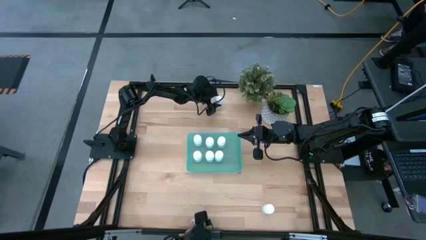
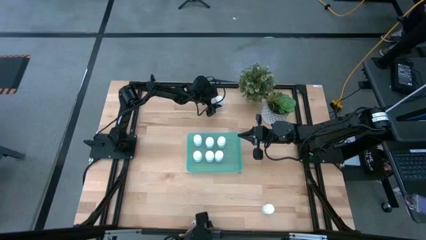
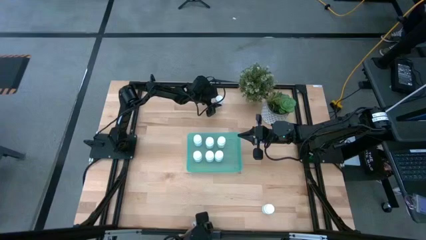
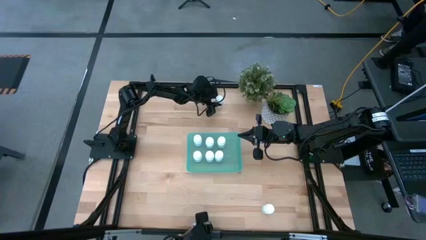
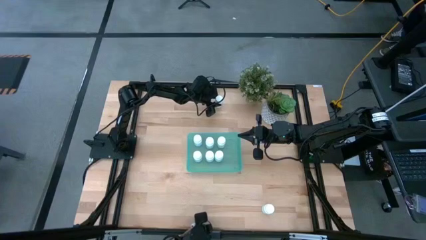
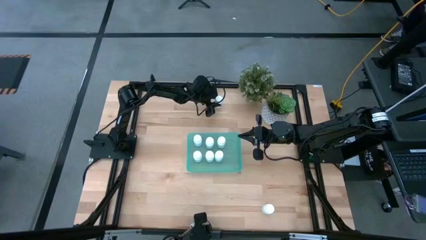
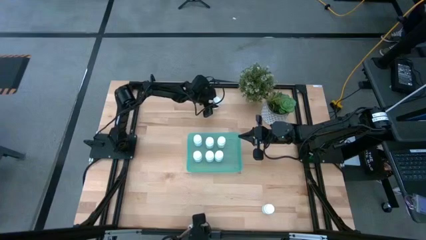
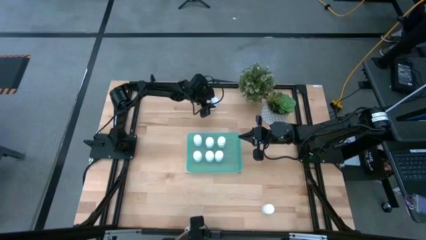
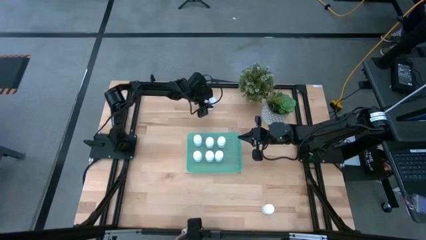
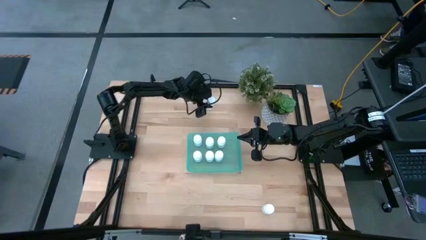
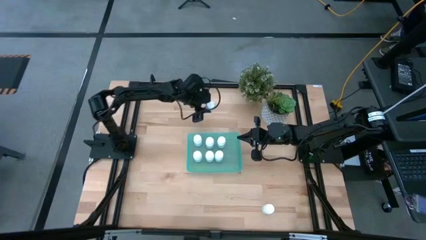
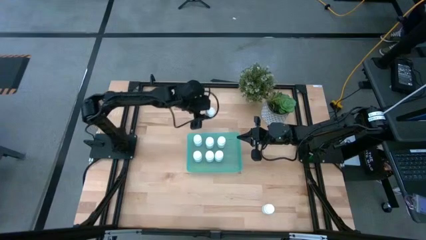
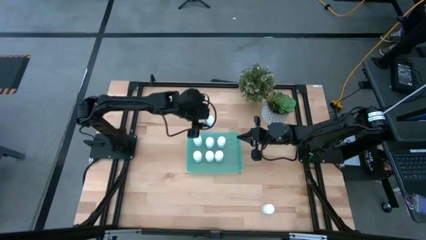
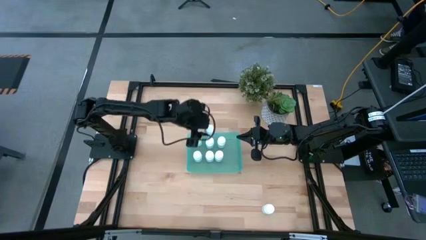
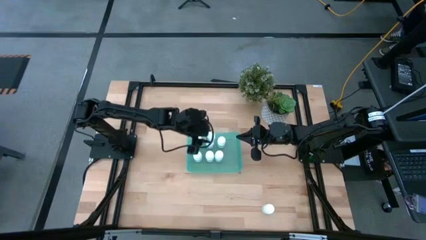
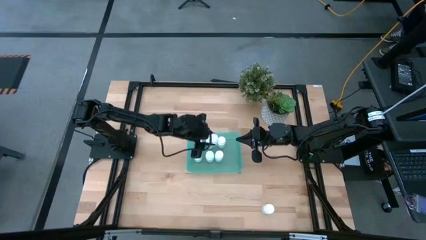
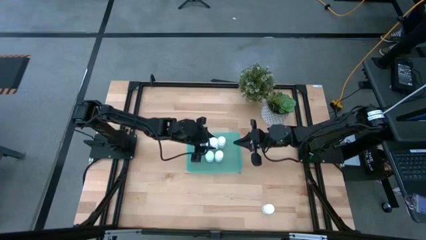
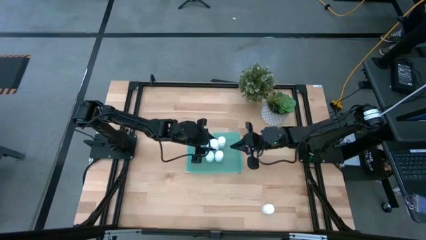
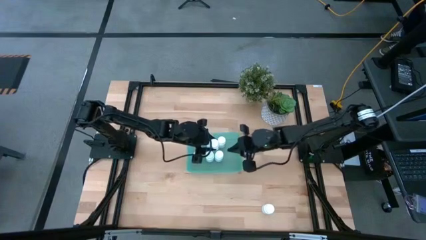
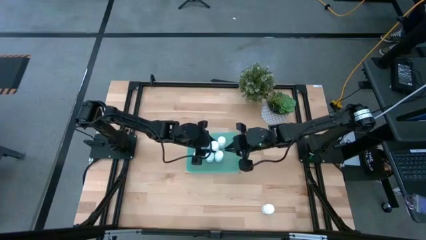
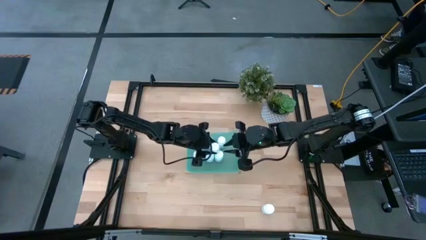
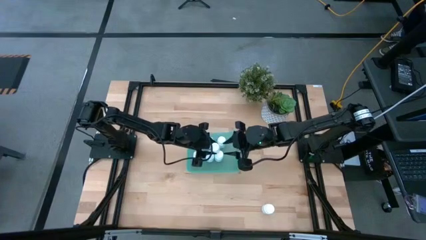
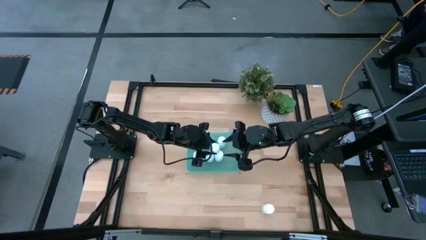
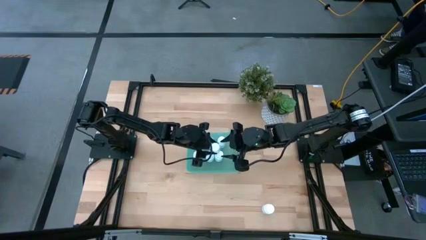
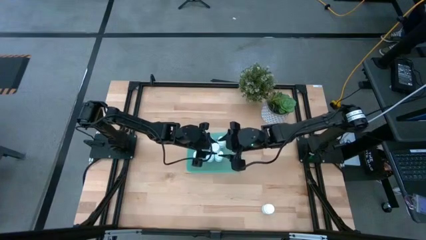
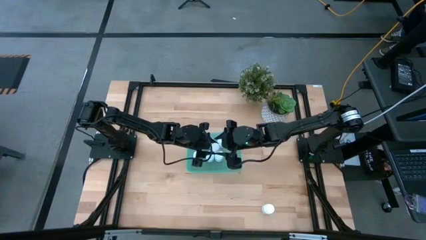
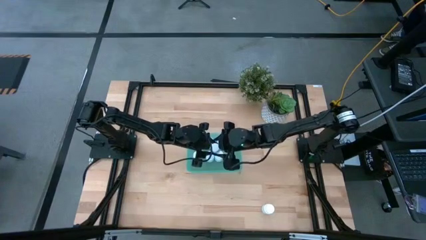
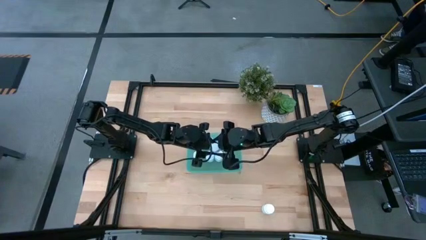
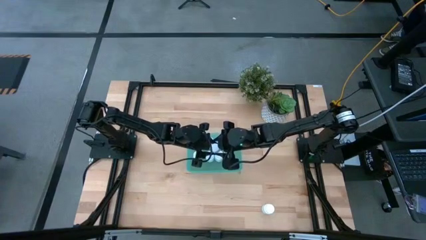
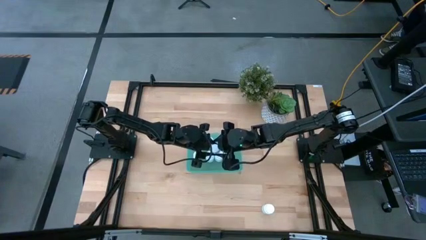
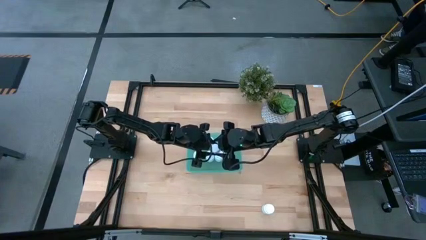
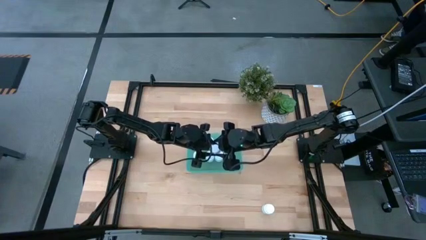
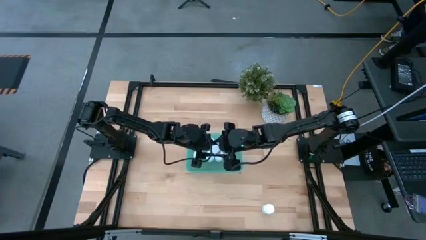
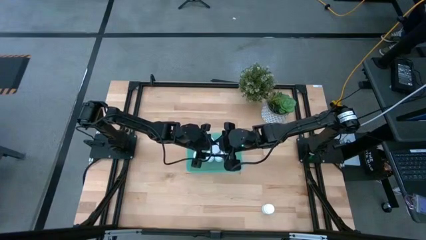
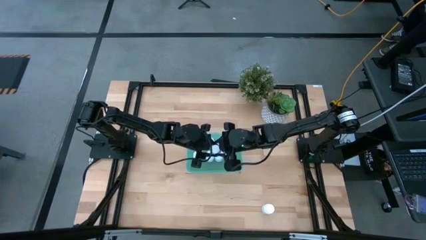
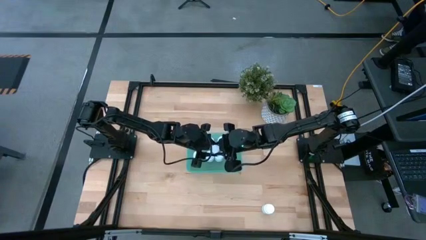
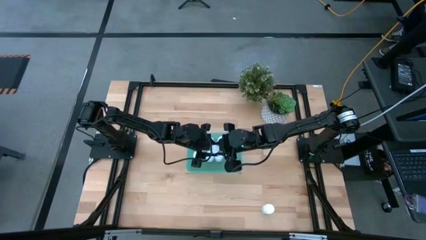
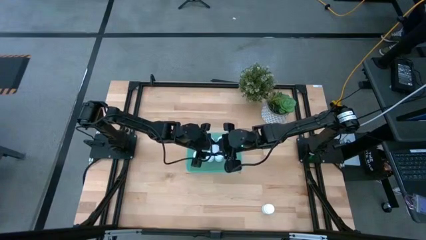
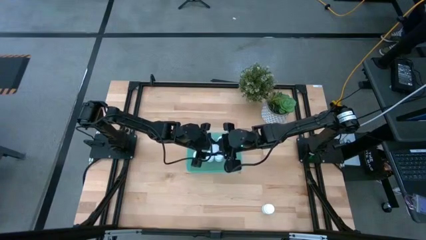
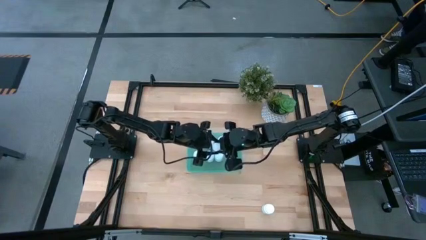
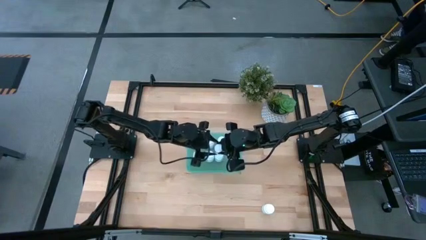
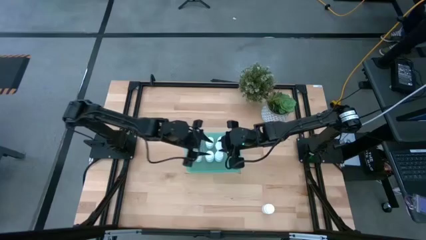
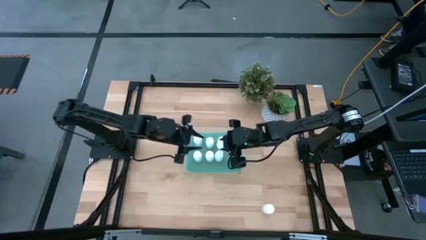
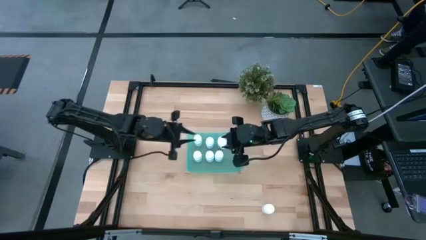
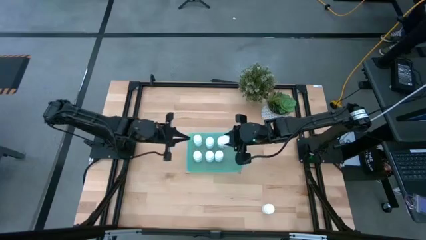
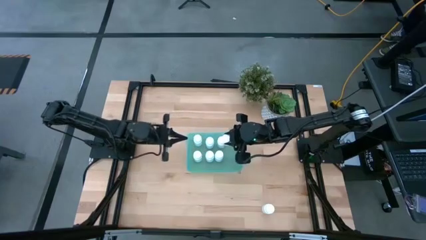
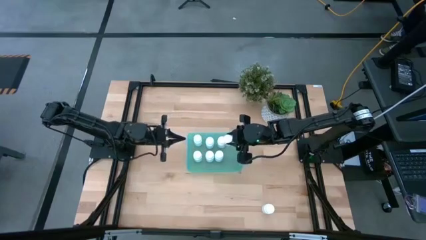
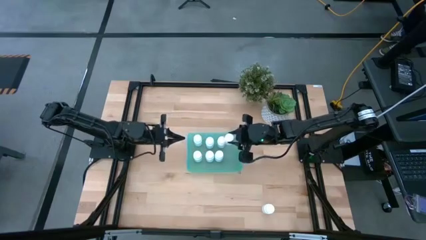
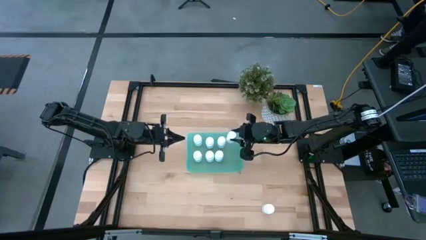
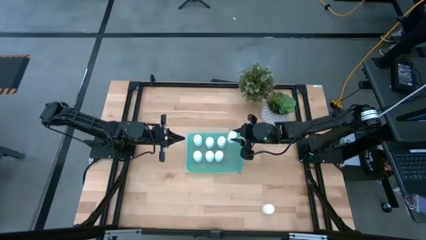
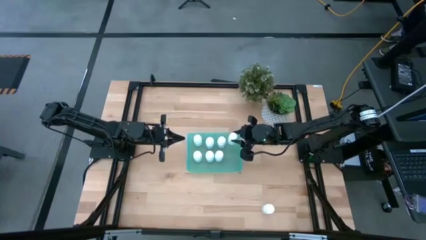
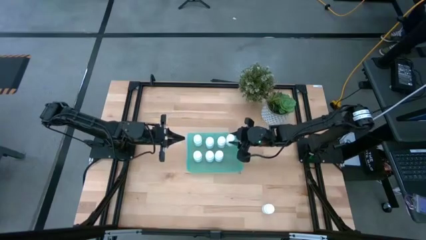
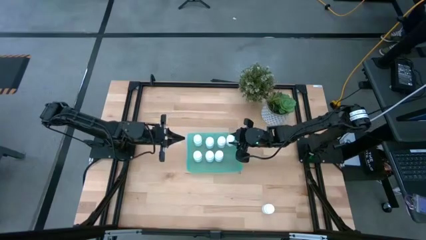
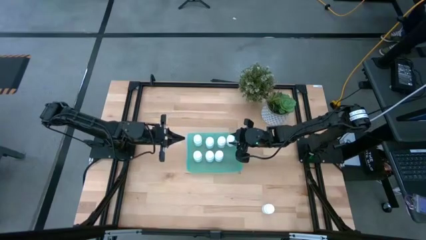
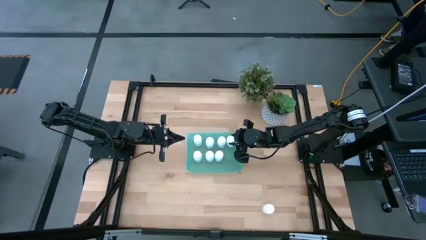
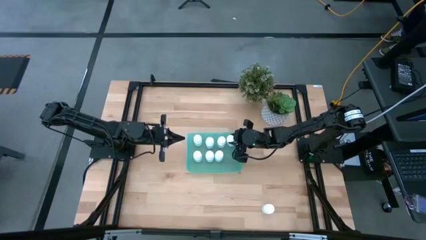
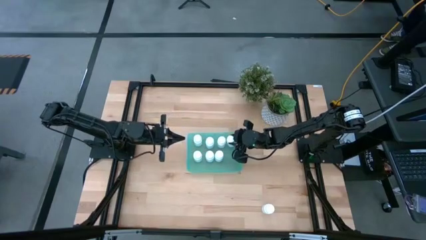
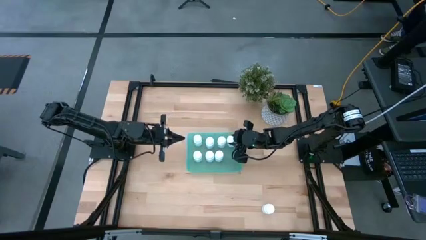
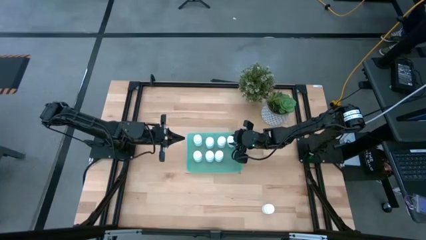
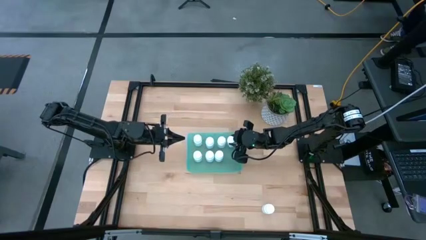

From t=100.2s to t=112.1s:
Task: Pick and place pill bottles into a basket
Put the white pill bottle into the blue bin

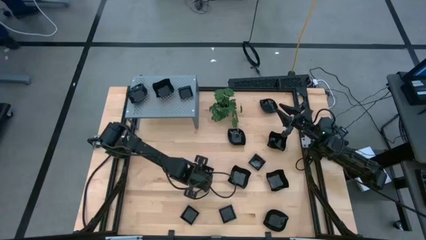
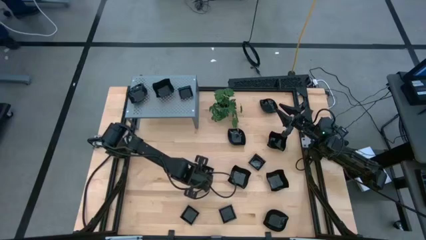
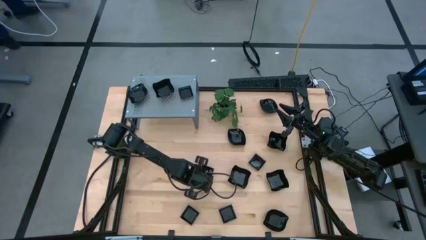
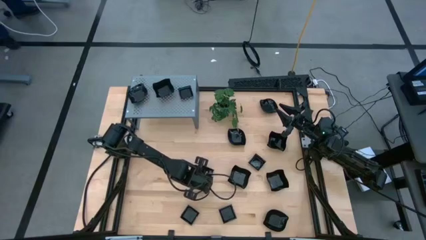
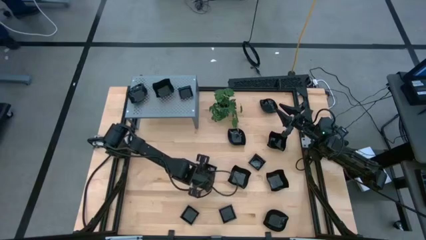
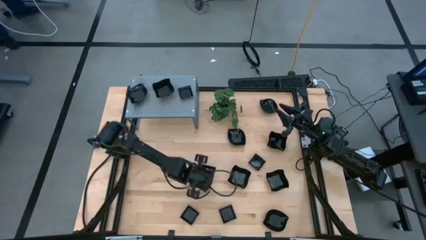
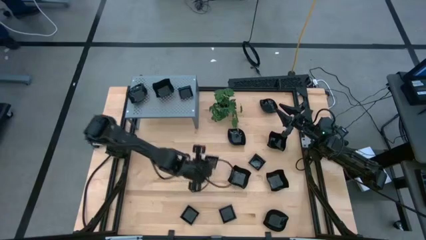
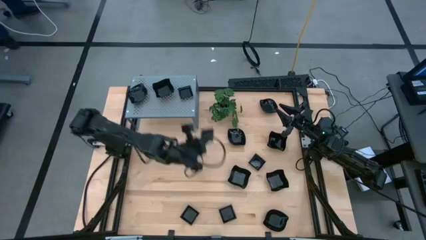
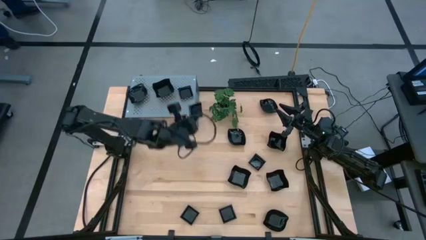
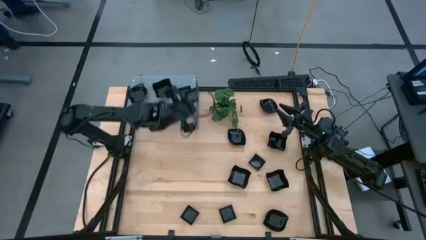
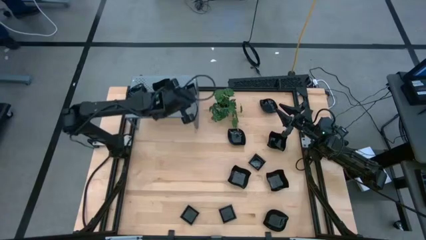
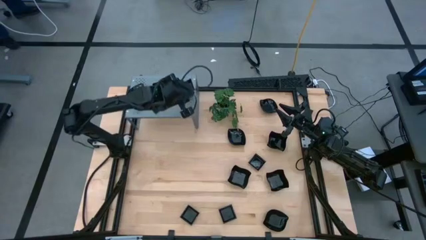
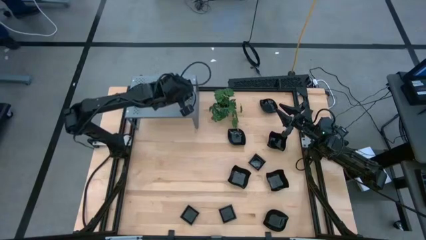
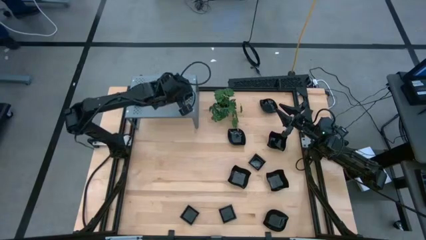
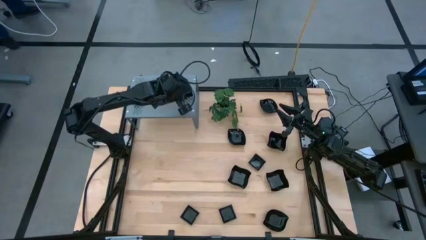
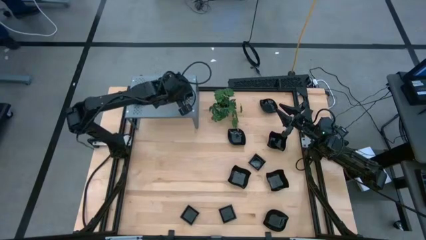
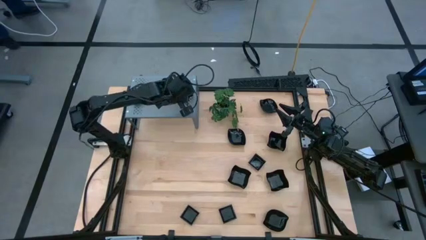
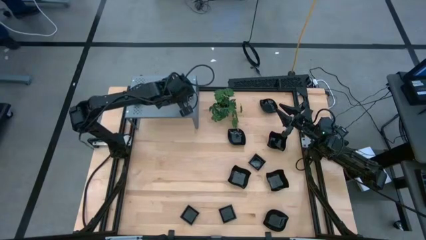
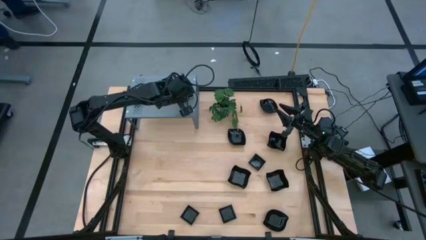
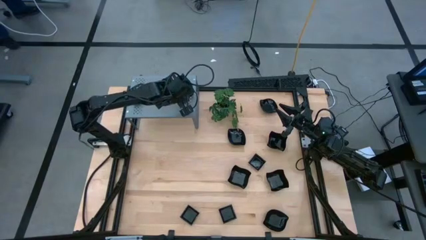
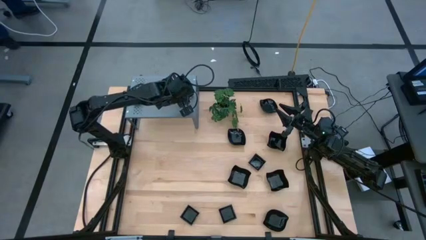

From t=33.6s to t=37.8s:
Task: Pick & Place Mini shaped plates
Stack the black leaf plate on top of the black leaf plate on the shelf
